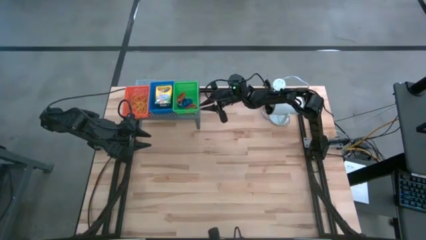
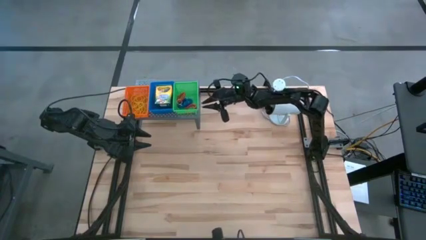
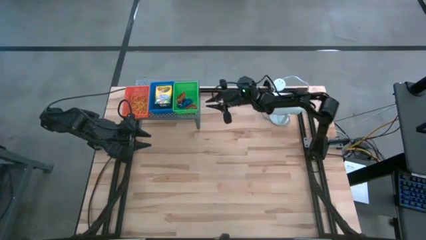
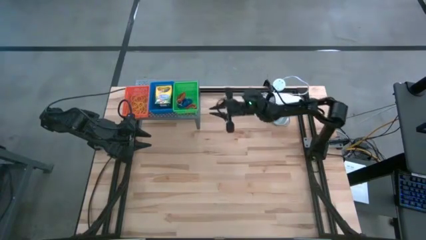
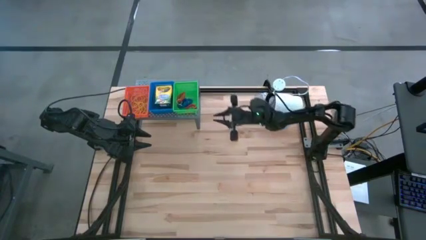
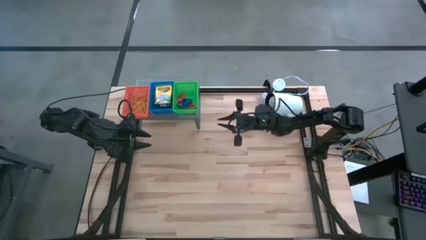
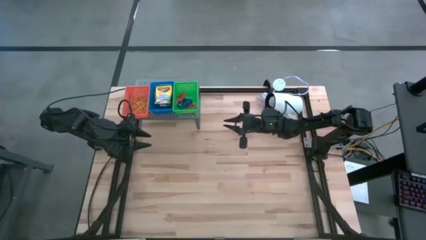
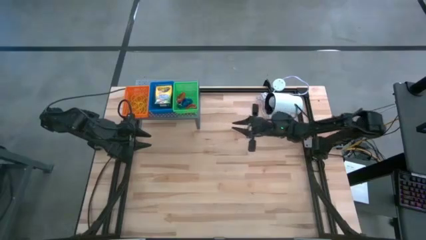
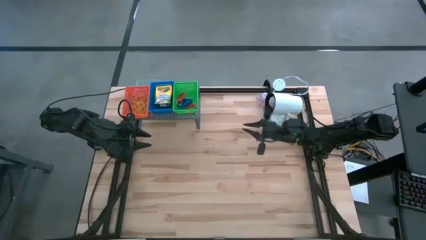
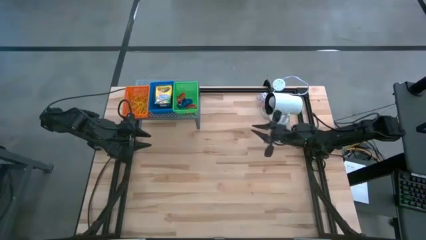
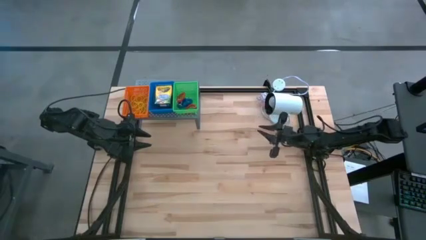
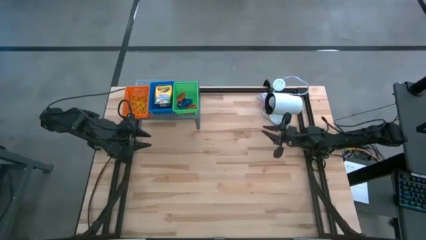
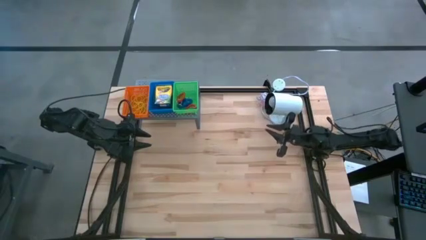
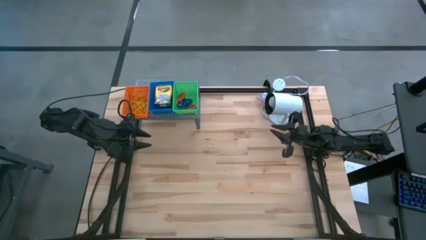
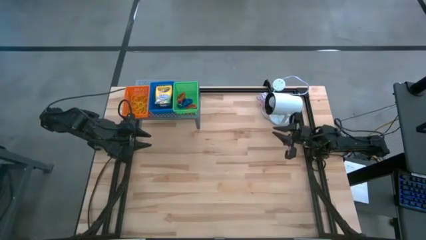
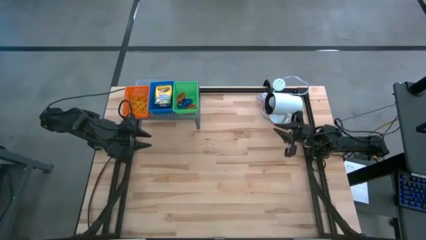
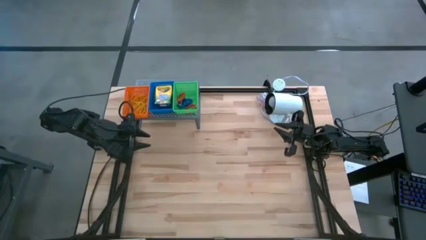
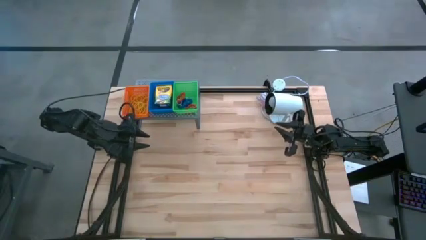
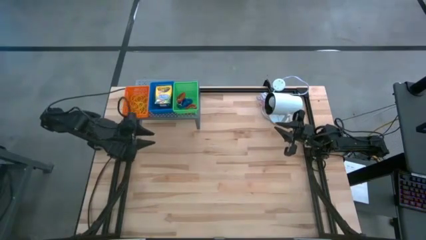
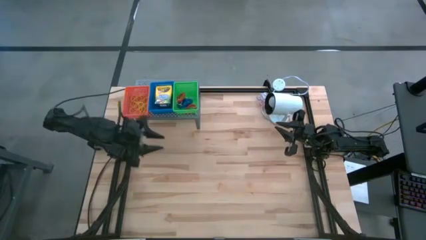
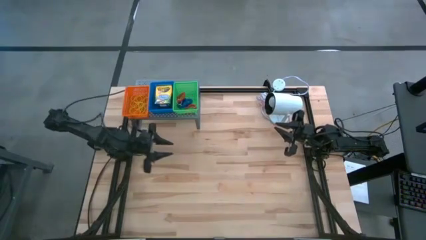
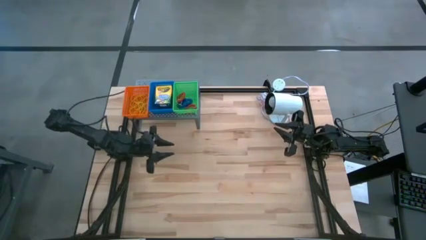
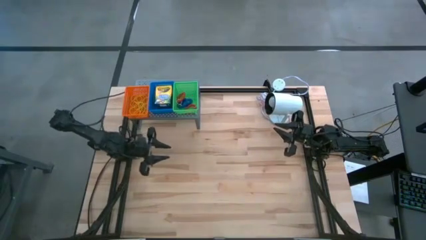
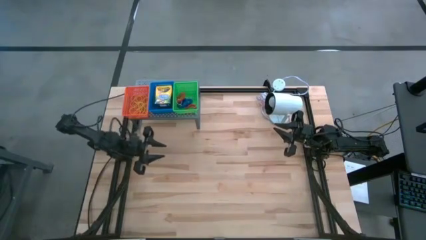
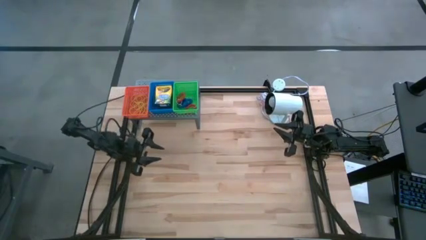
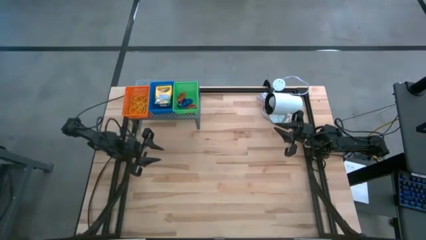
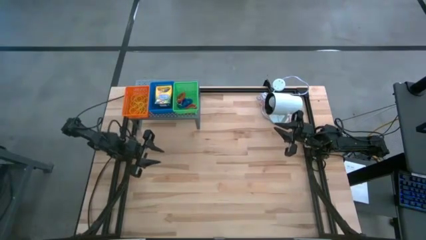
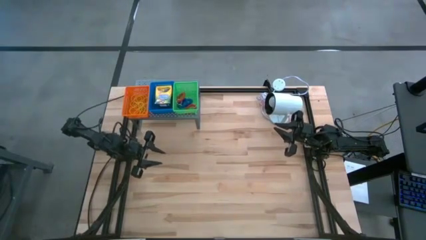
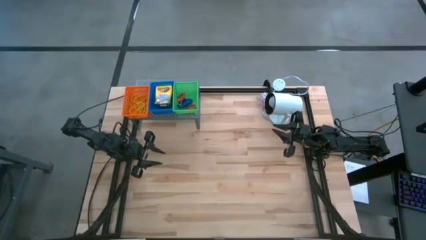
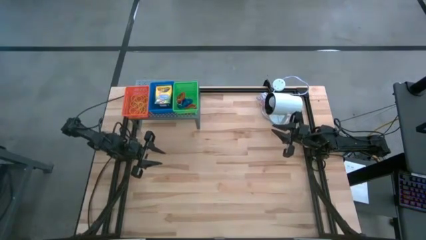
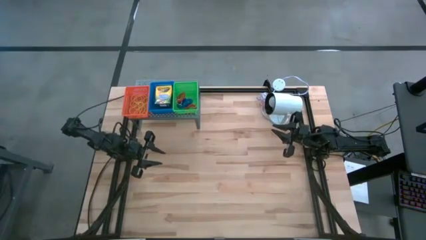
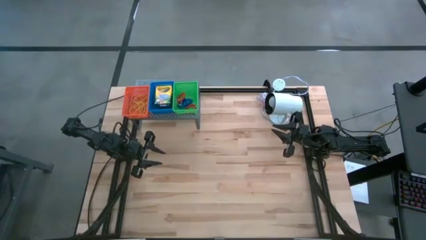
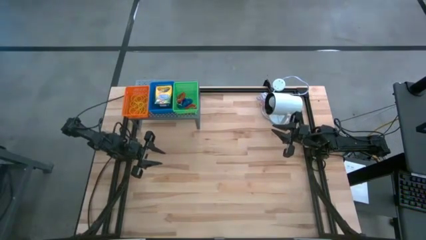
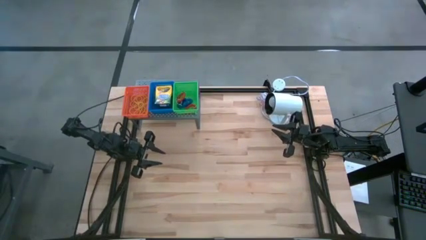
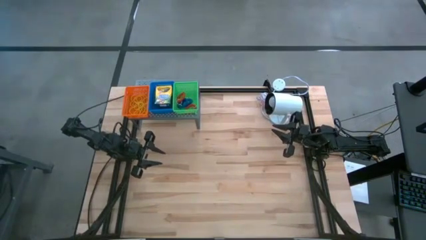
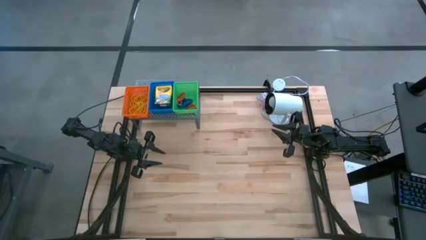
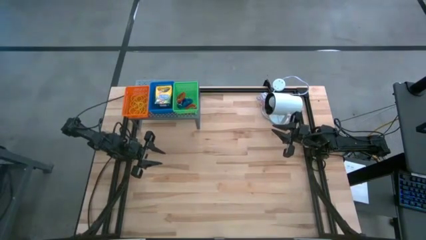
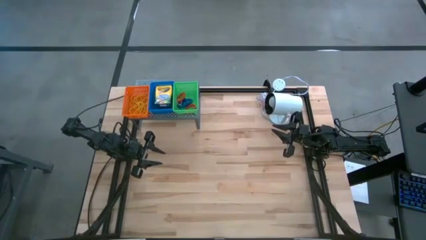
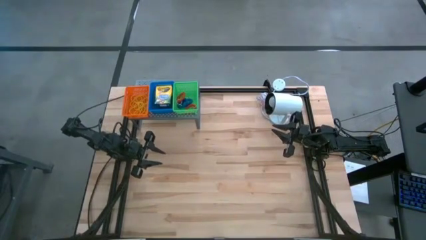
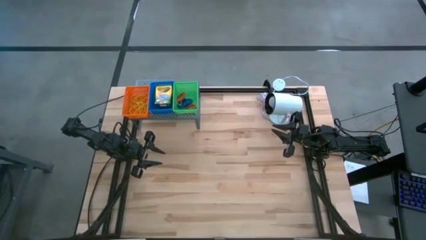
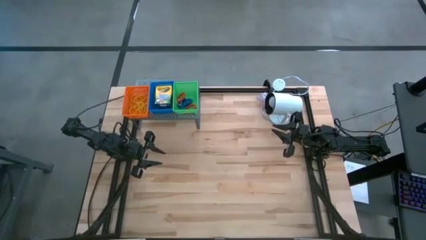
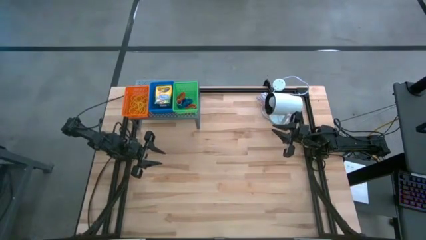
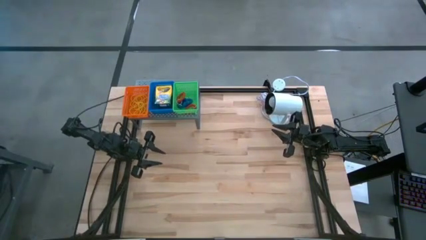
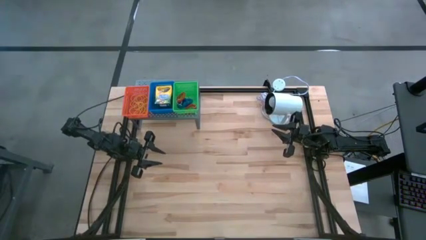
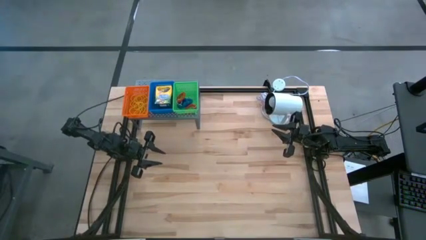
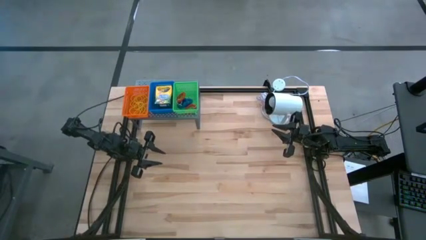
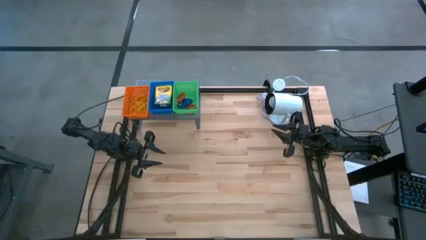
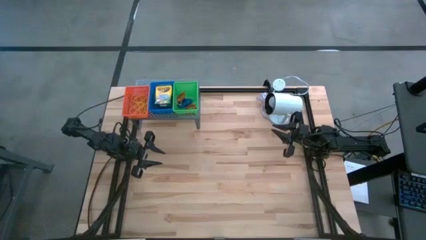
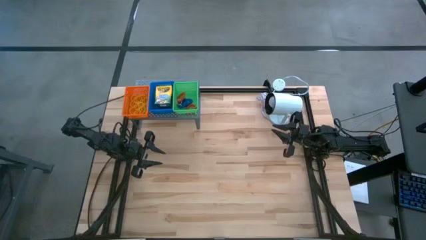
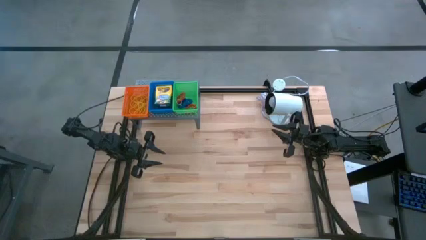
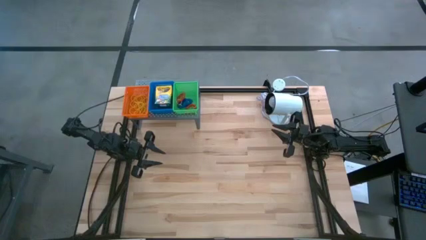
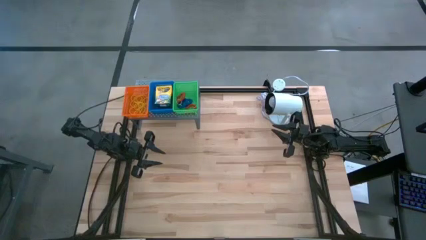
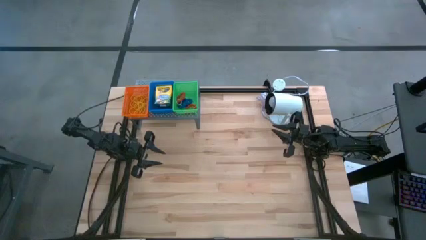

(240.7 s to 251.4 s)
Task: Pick & Place Office Desk Supplies
Return to Home Position

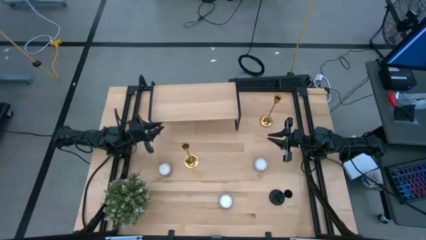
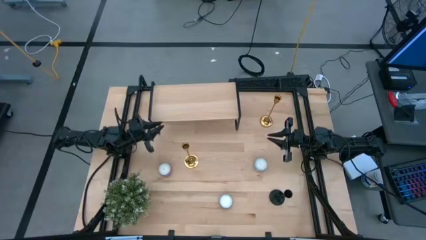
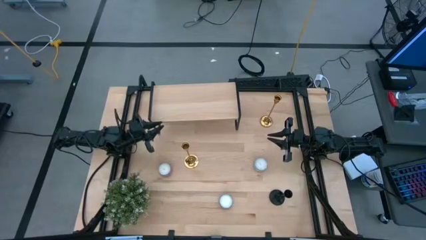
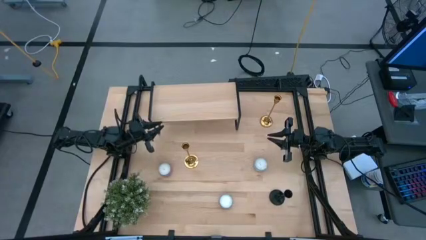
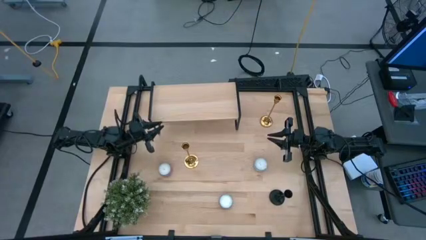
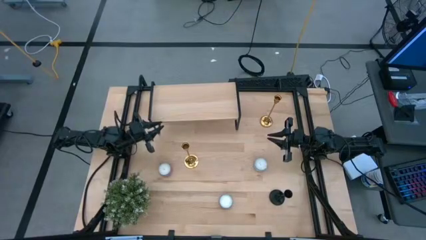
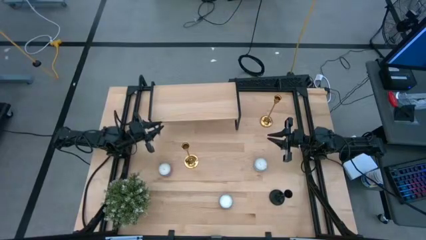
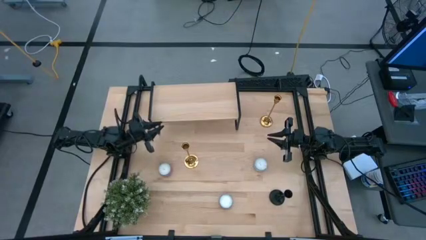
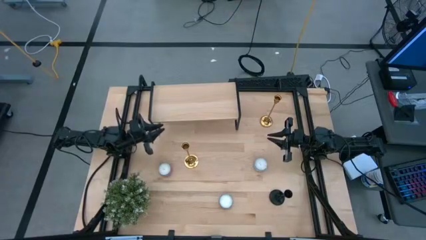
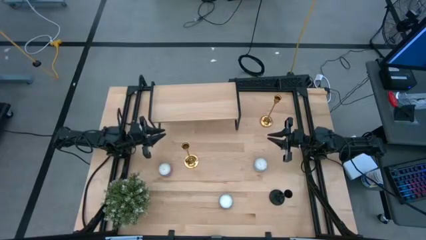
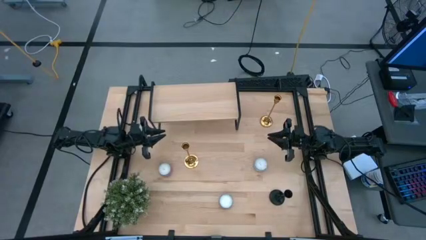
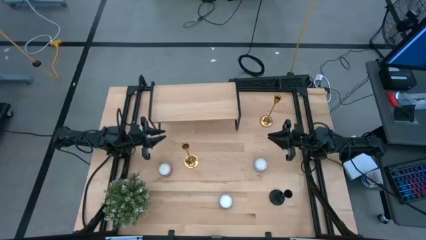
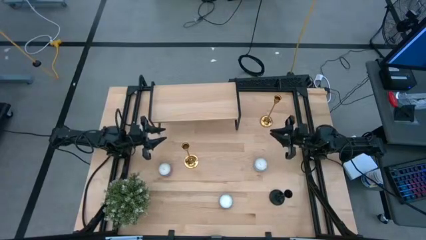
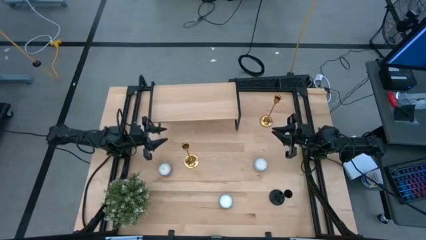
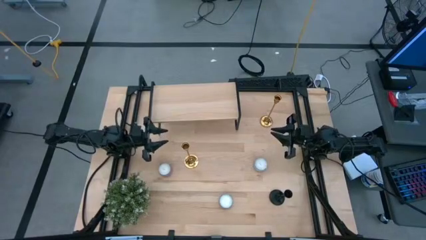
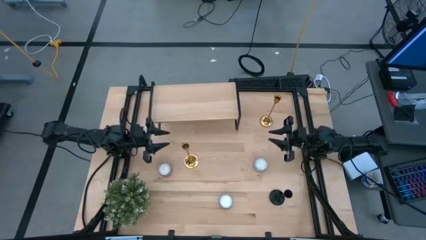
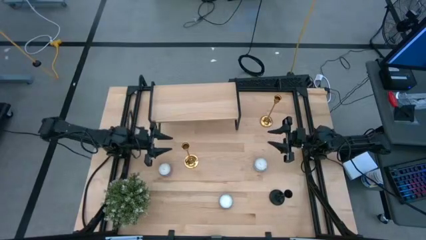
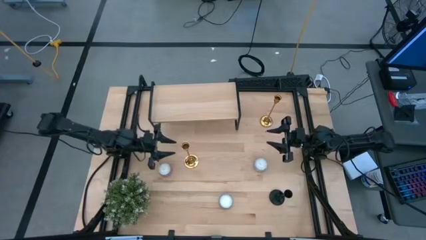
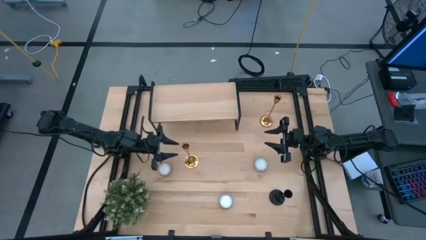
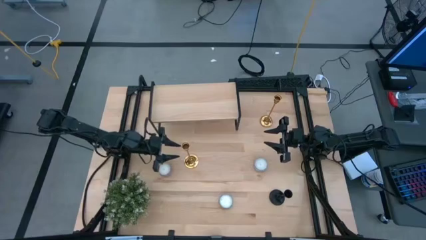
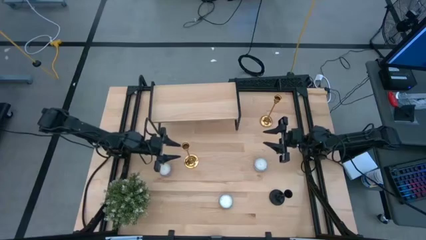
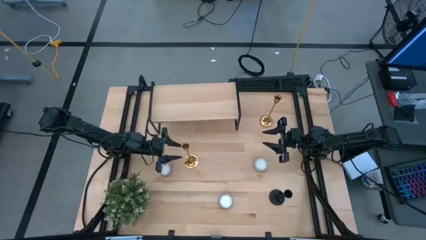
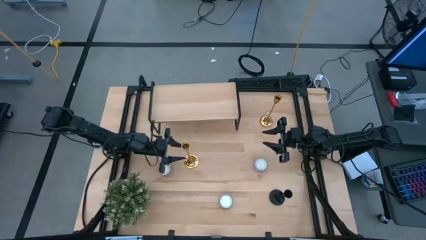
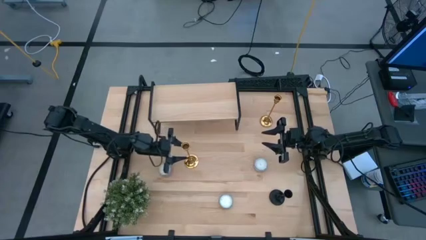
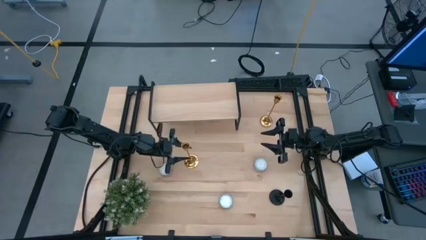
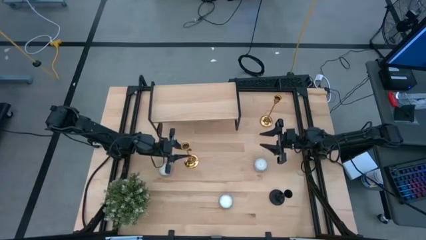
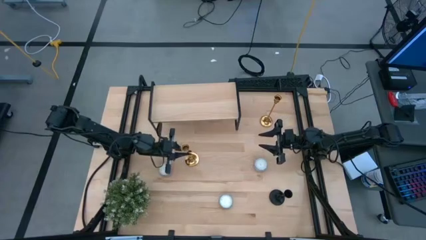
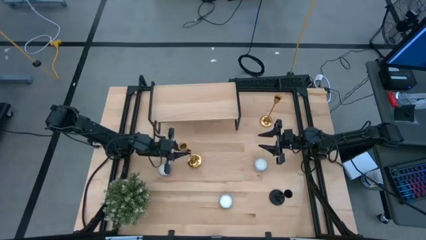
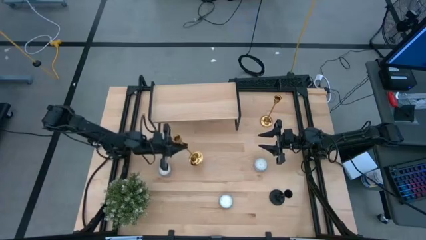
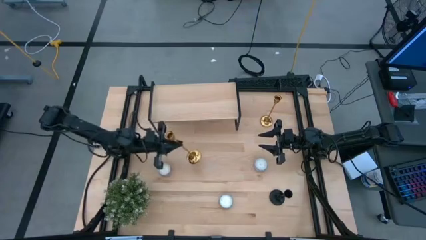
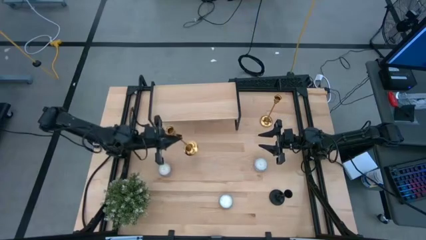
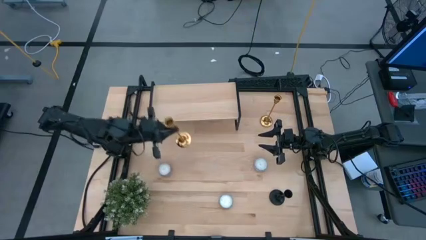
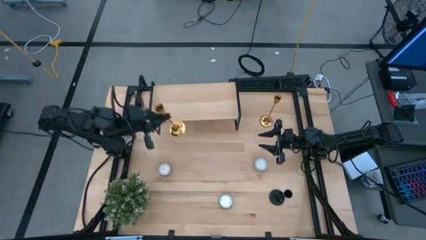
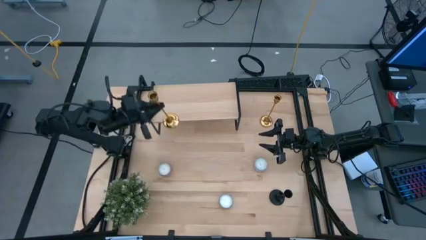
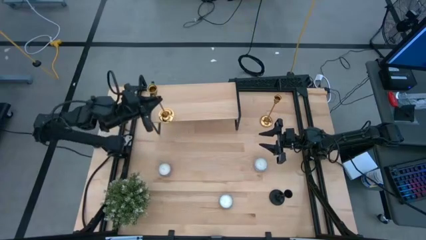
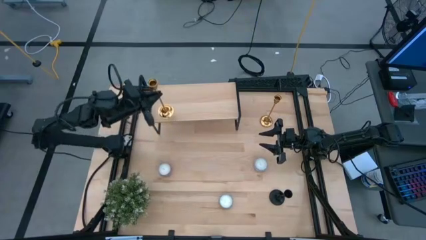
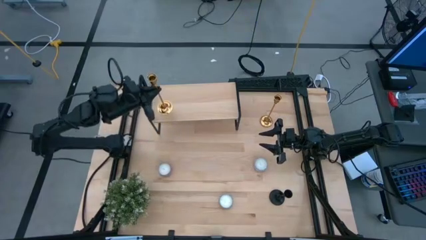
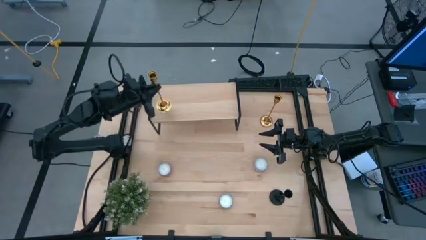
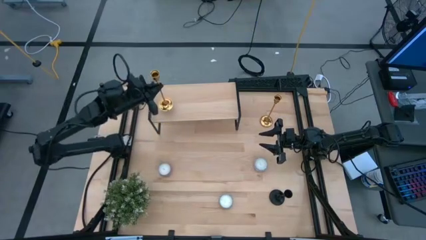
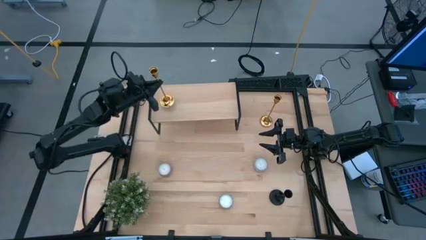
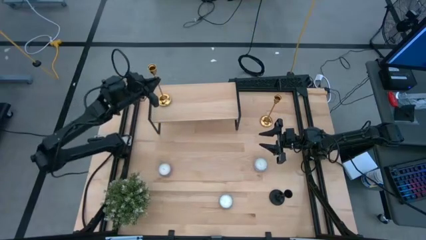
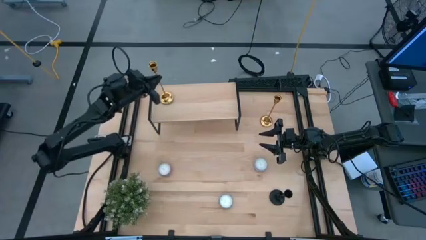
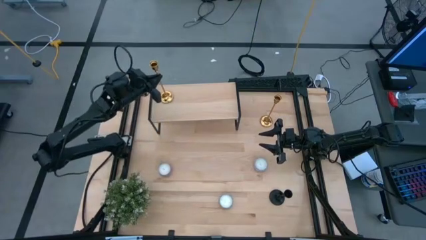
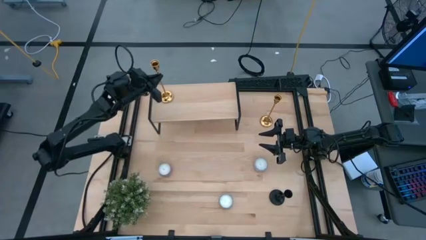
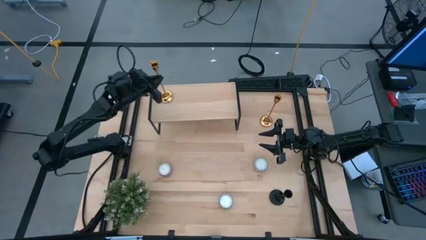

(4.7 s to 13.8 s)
Task: Pick & Place candle stick holders
Put the left gold candle holder on the shelf
